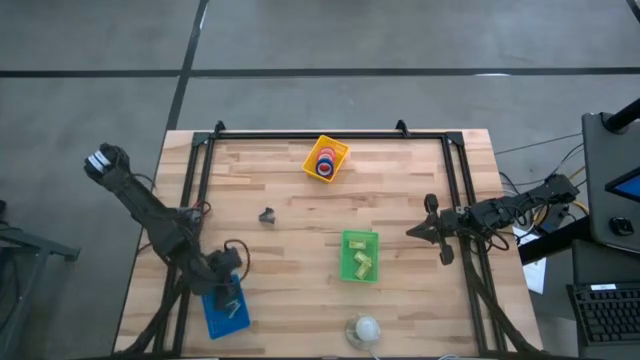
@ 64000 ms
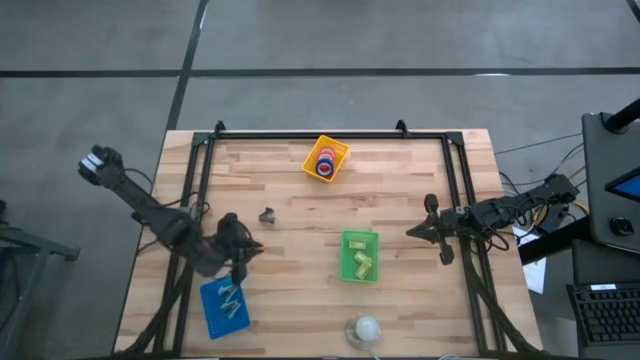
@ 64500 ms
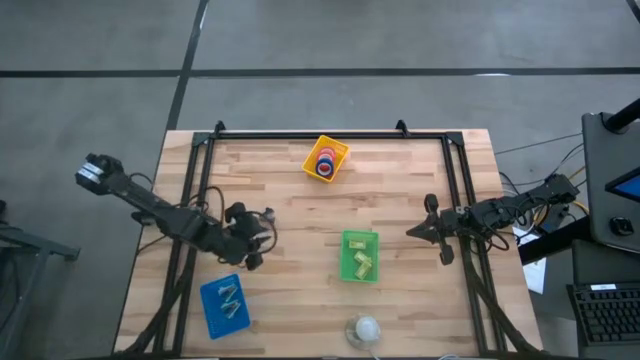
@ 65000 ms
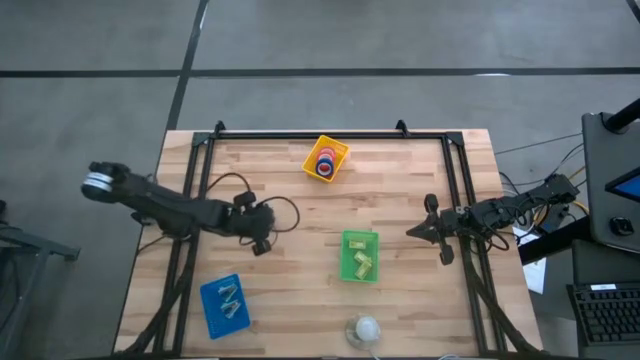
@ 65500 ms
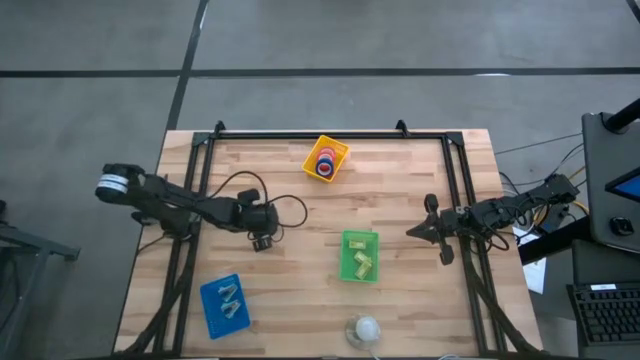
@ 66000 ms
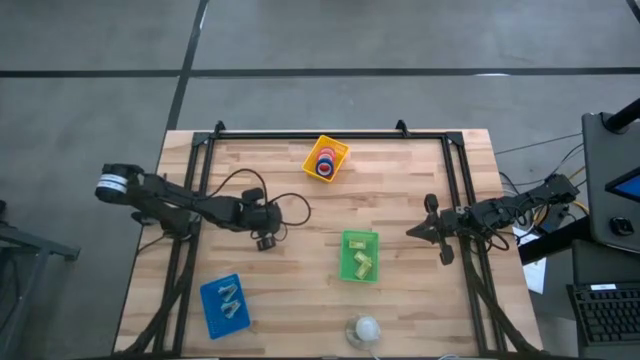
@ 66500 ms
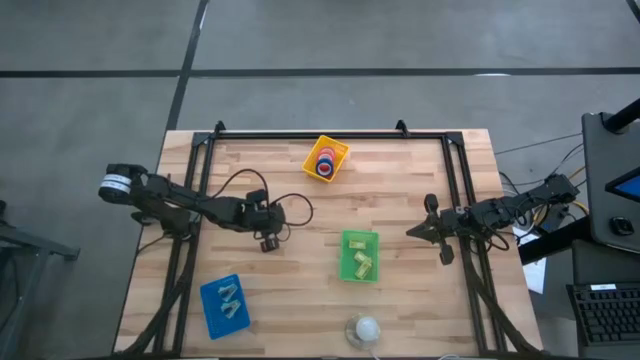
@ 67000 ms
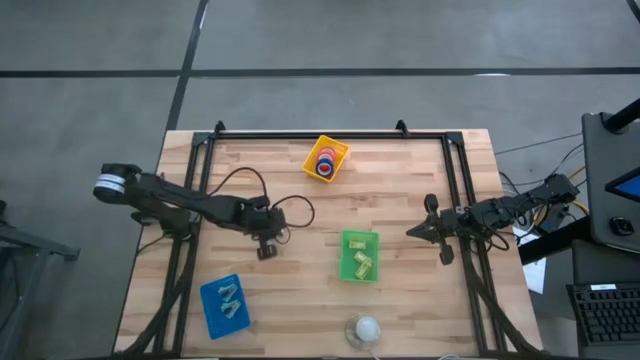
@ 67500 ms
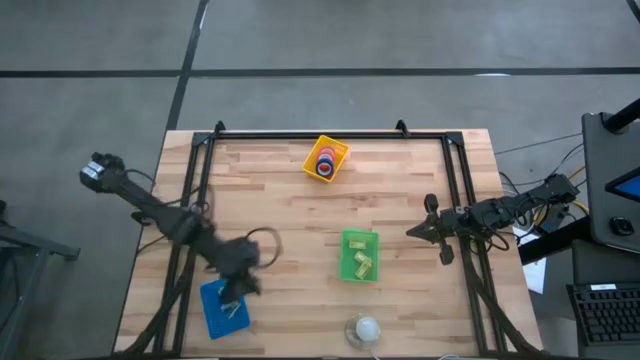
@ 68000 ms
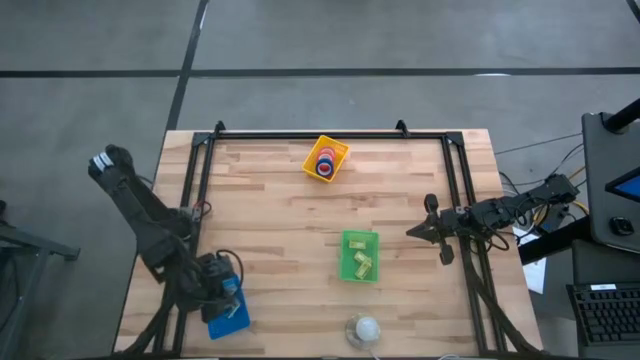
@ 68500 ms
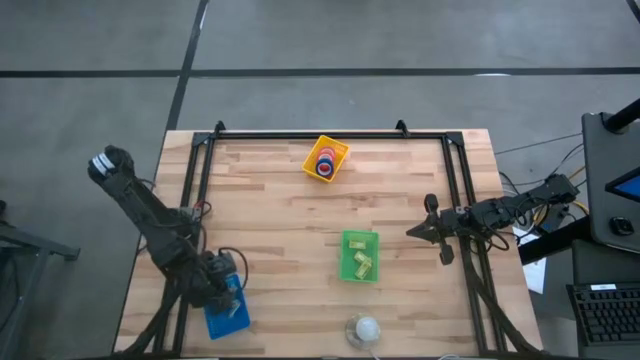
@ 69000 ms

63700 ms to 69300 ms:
Task: Pick and place Stapler, Stapler remover, tape
Put the black stapler into the blue bin

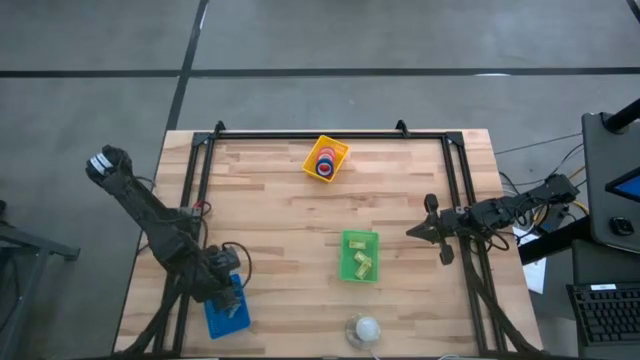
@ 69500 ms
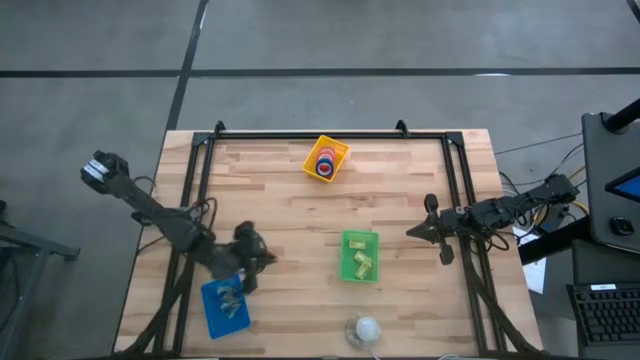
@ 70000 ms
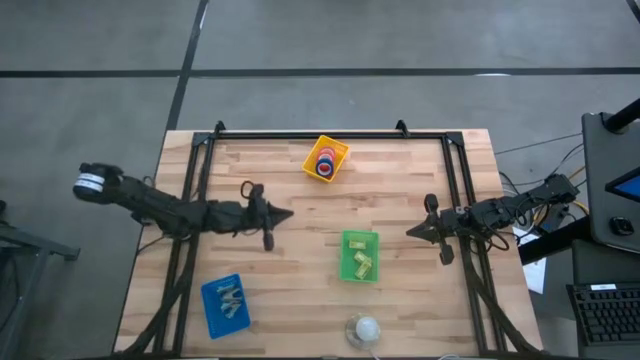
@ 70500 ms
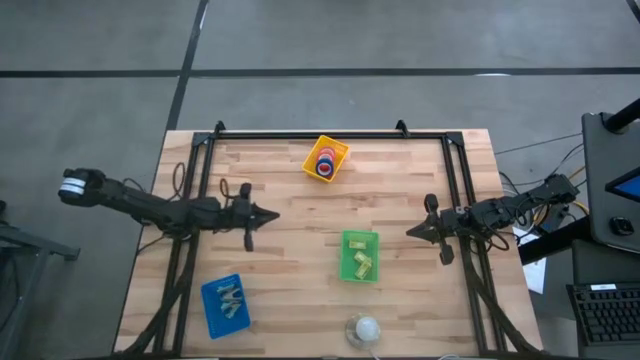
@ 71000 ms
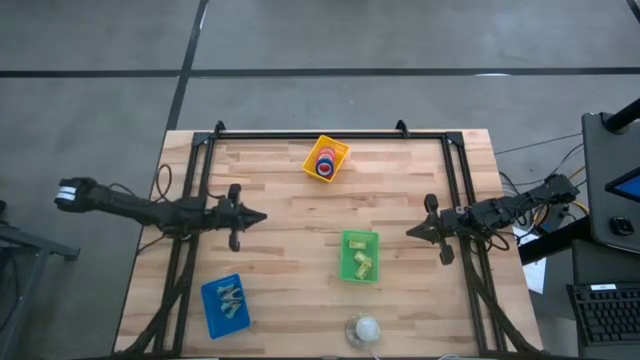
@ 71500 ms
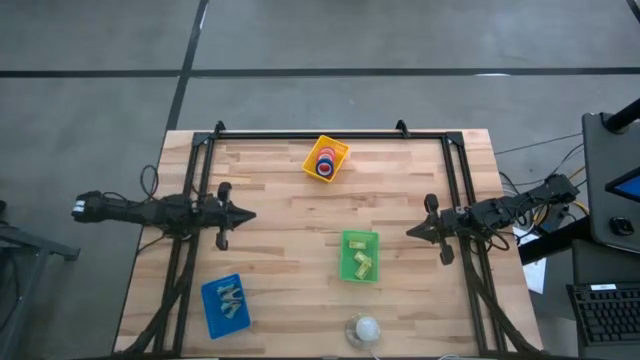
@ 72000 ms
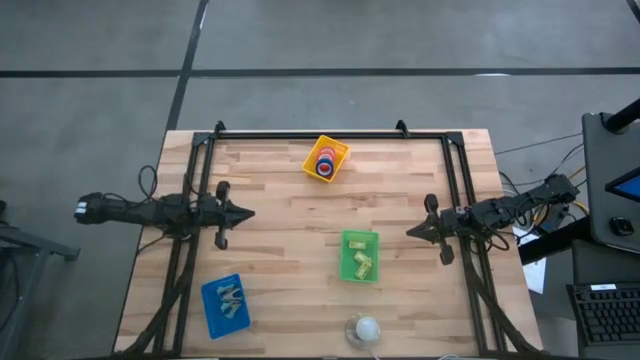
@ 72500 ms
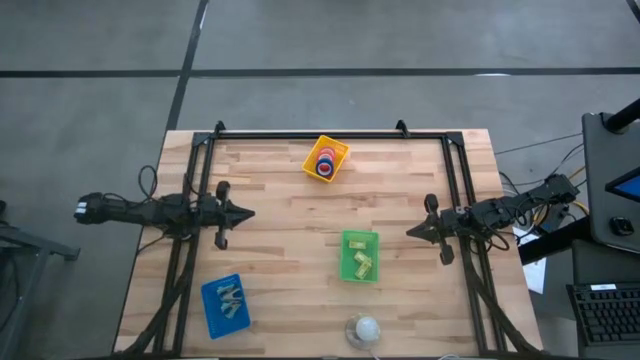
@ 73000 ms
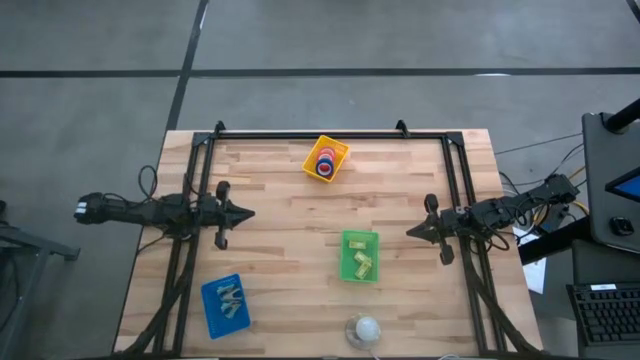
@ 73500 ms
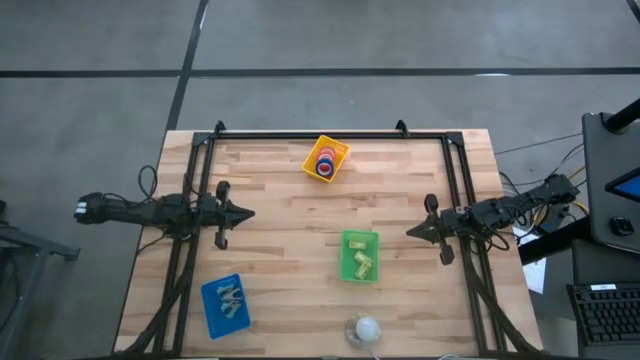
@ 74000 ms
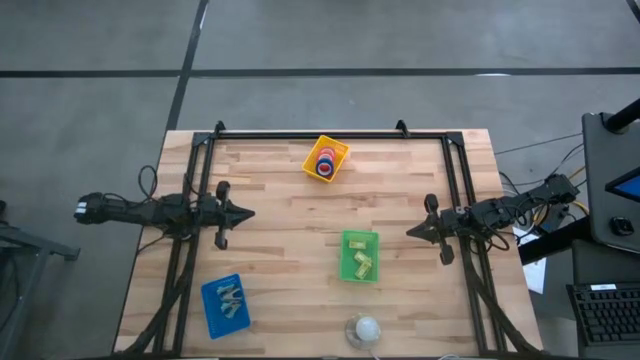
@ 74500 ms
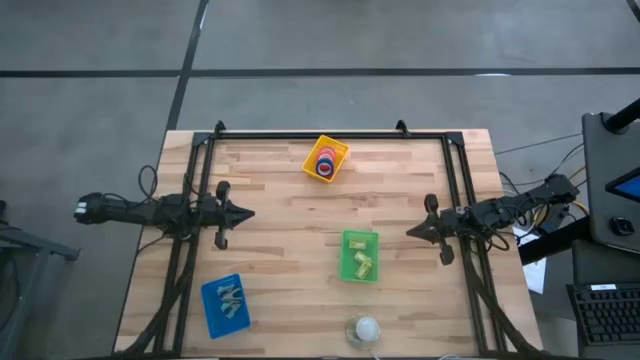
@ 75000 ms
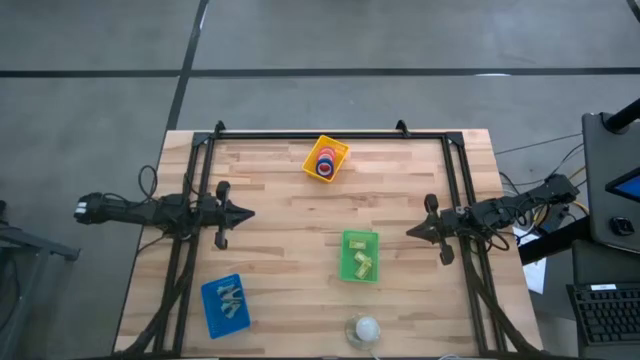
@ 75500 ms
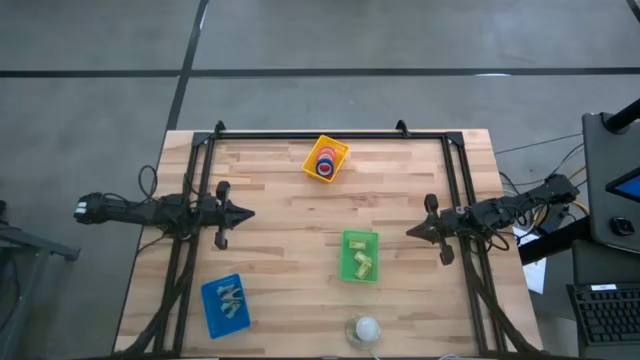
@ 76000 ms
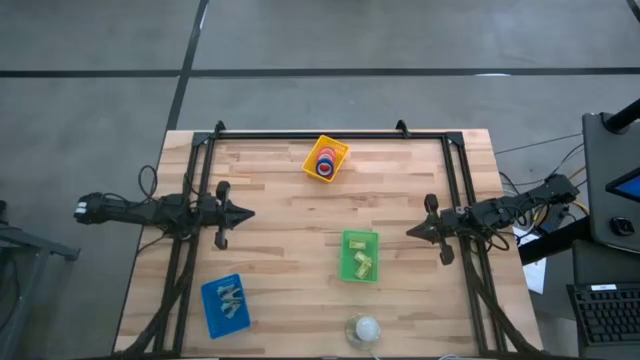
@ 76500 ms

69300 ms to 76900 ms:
Return to Home Position

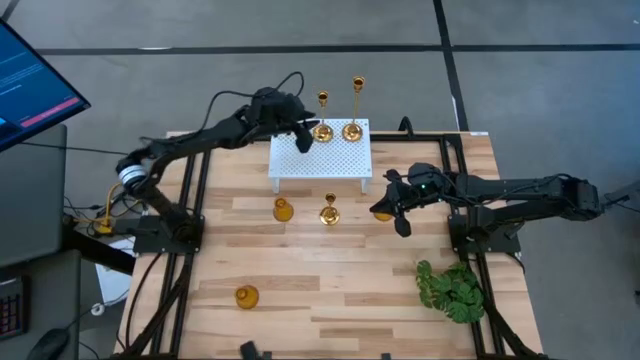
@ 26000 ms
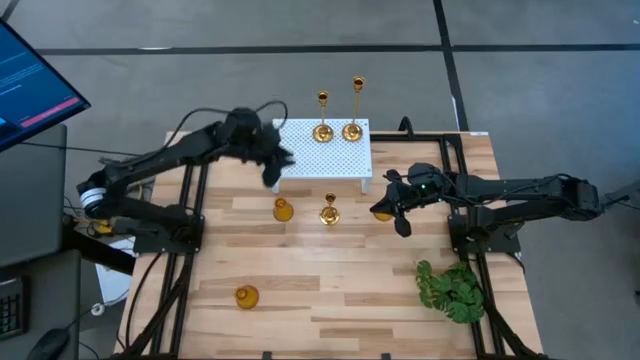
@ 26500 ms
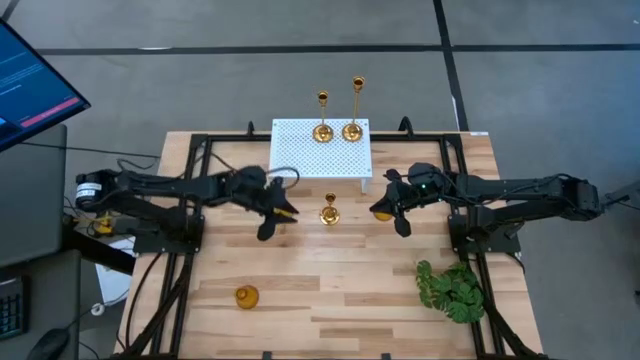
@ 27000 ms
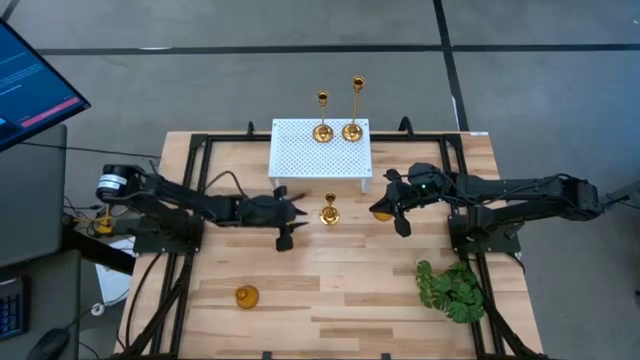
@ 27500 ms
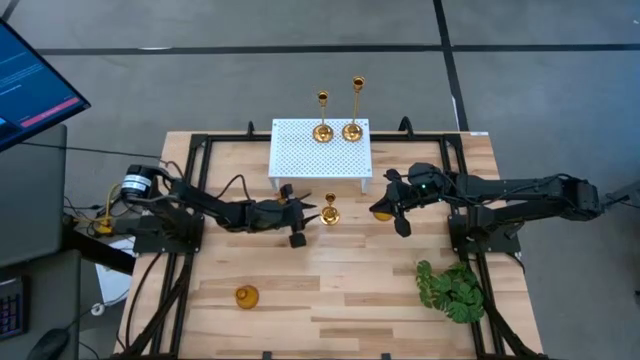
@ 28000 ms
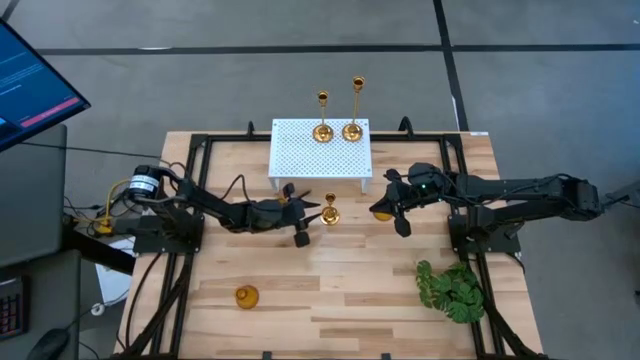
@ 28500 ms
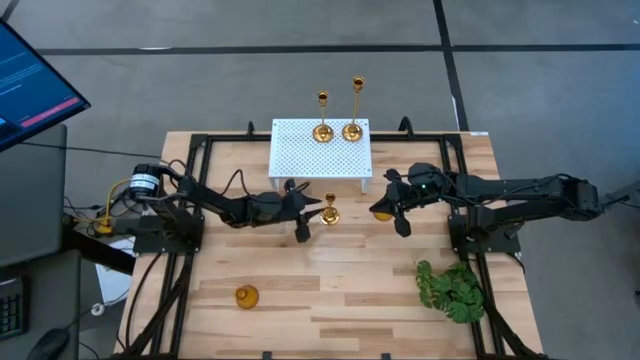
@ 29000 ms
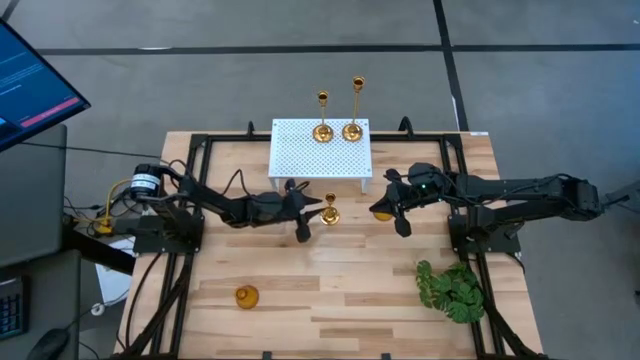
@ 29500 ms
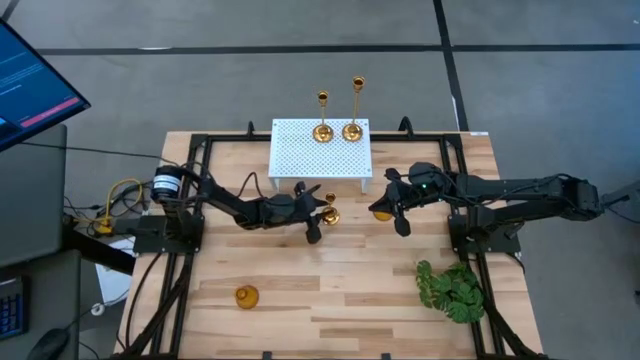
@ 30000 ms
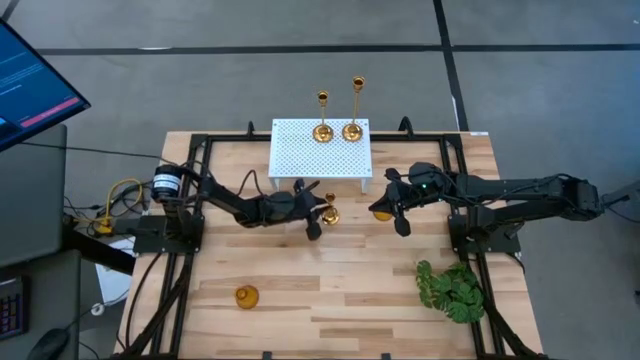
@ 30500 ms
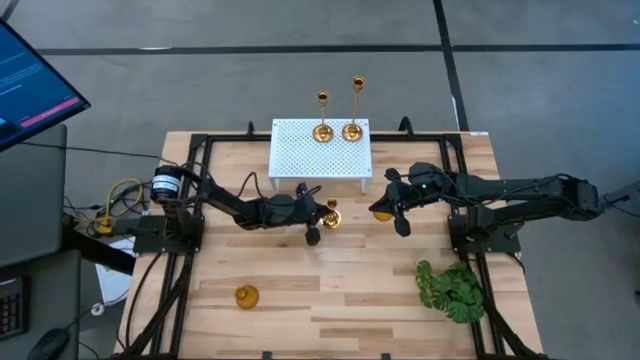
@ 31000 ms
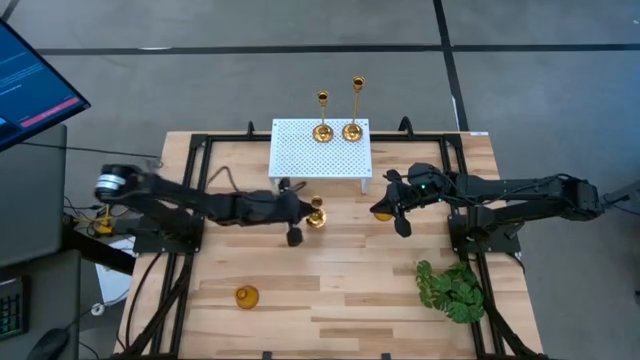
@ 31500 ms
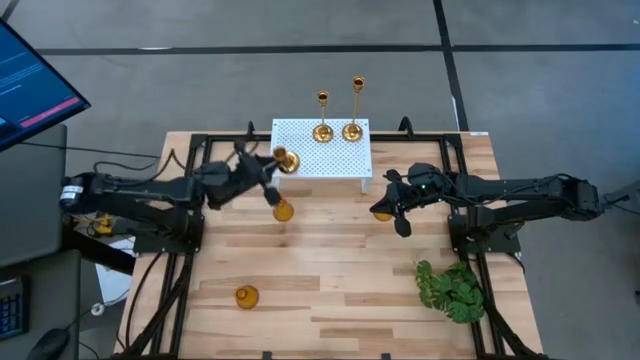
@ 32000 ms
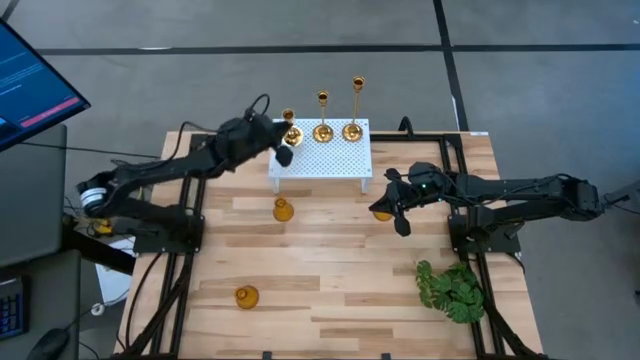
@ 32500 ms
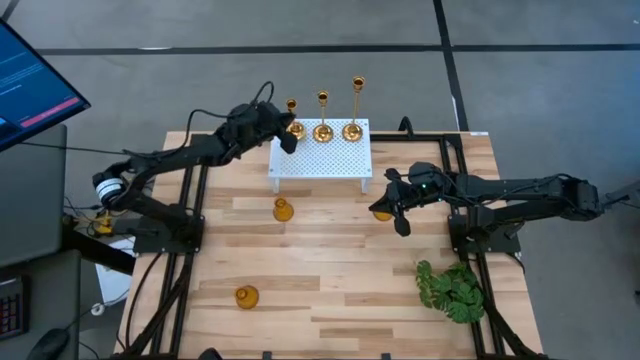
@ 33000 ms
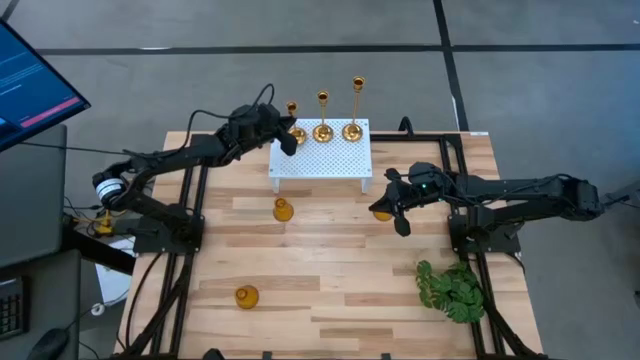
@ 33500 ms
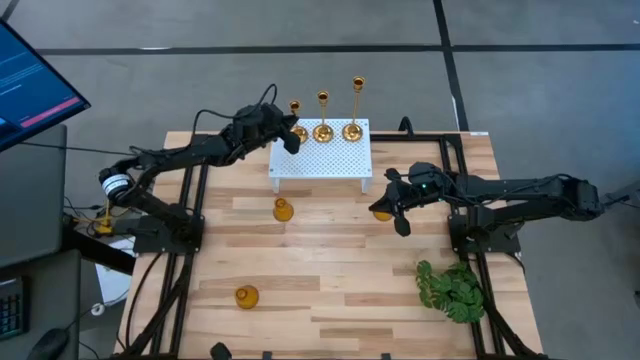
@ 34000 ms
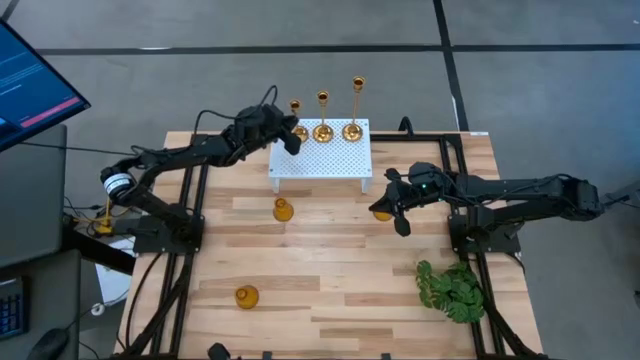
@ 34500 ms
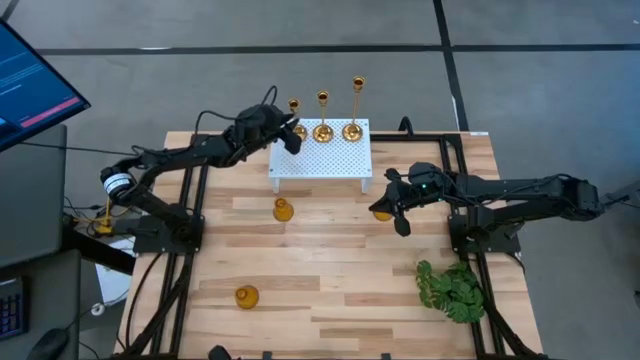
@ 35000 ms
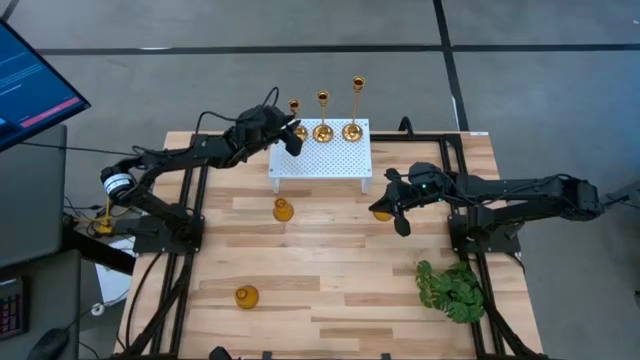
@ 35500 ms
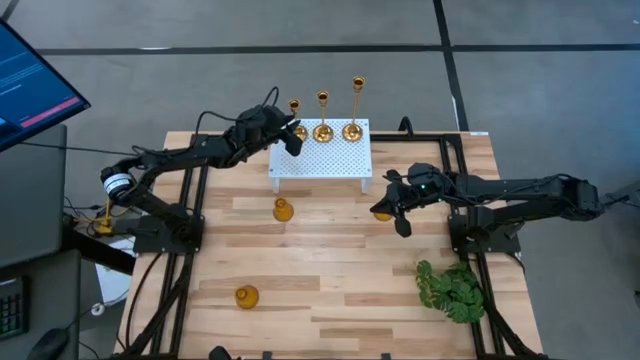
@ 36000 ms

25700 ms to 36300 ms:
Task: Pick & Place candle stick holders
Put the small gold candle holder on the shelf
